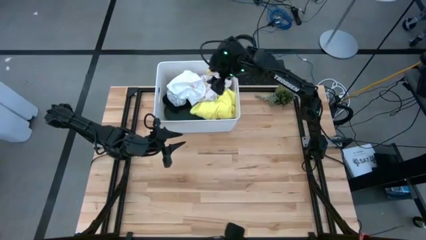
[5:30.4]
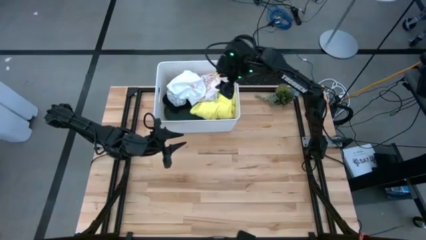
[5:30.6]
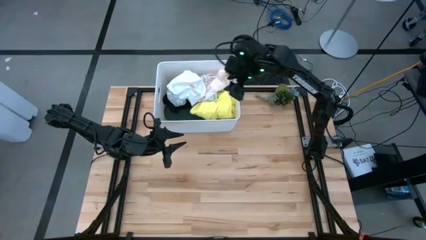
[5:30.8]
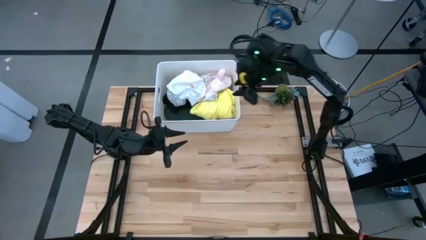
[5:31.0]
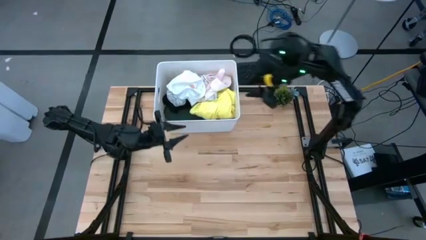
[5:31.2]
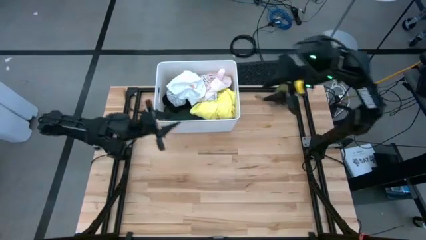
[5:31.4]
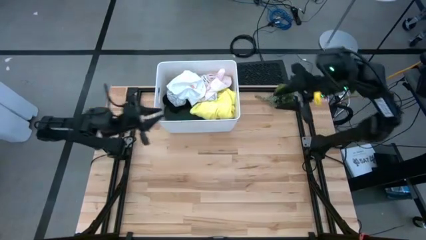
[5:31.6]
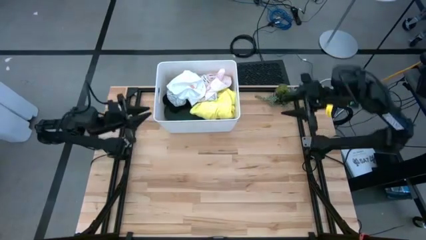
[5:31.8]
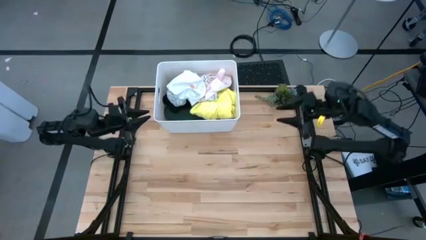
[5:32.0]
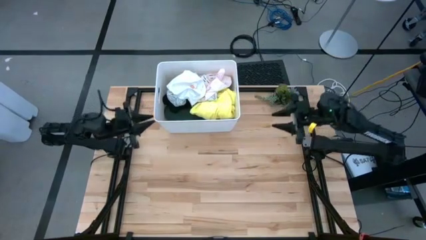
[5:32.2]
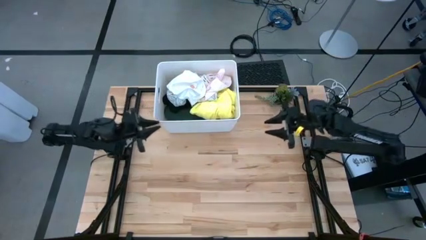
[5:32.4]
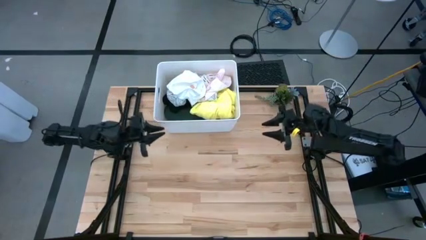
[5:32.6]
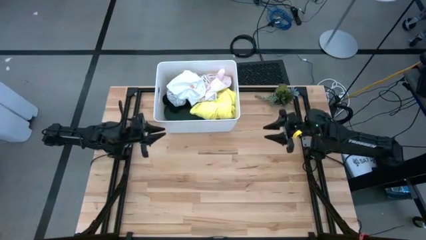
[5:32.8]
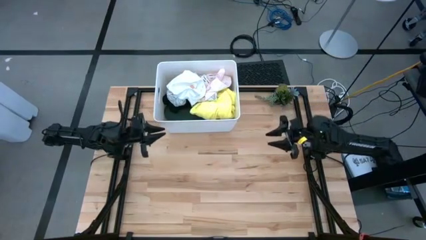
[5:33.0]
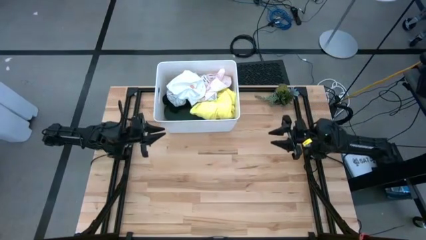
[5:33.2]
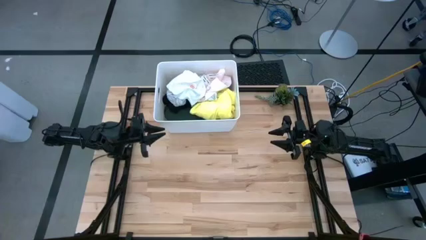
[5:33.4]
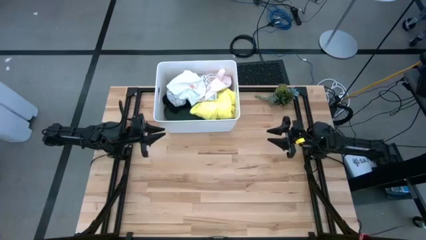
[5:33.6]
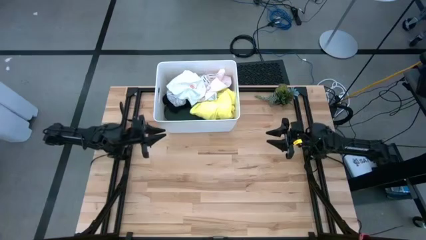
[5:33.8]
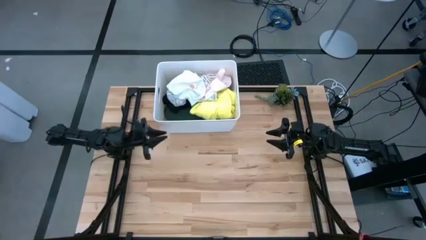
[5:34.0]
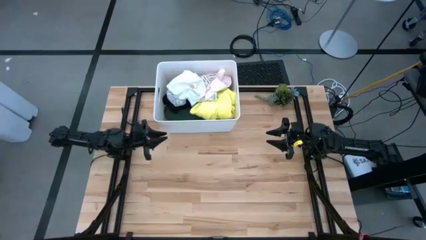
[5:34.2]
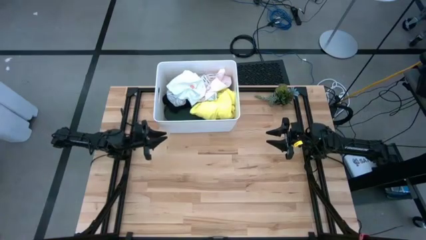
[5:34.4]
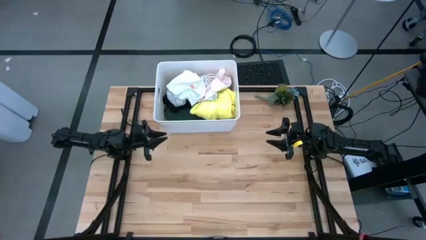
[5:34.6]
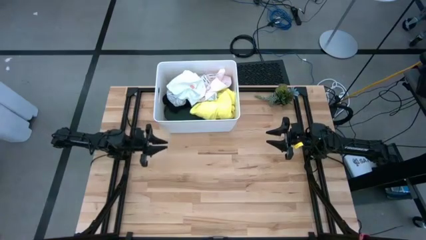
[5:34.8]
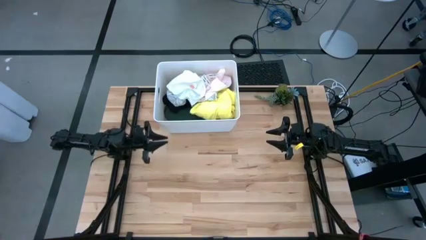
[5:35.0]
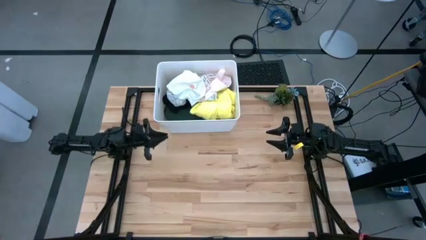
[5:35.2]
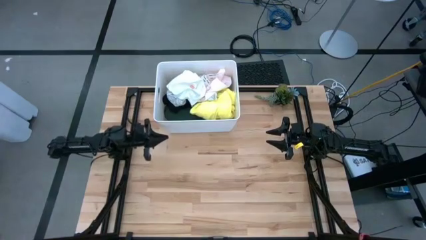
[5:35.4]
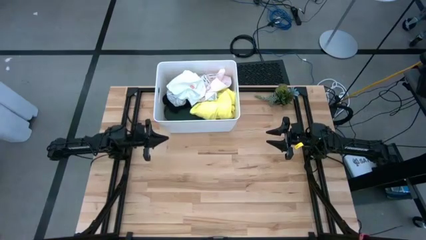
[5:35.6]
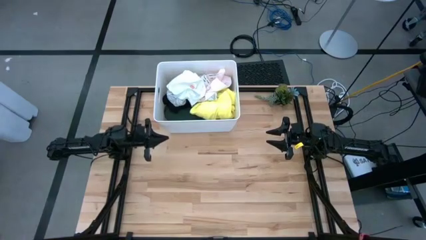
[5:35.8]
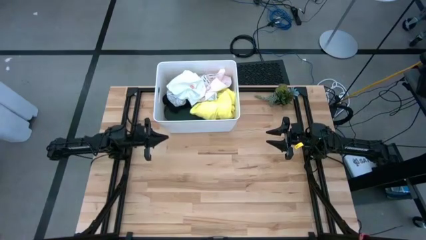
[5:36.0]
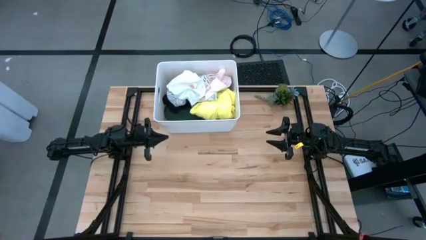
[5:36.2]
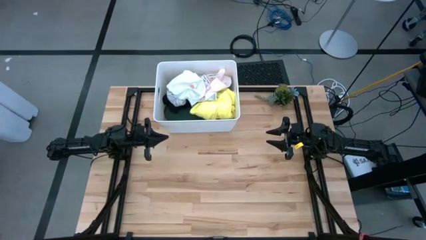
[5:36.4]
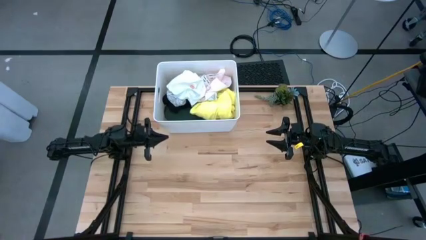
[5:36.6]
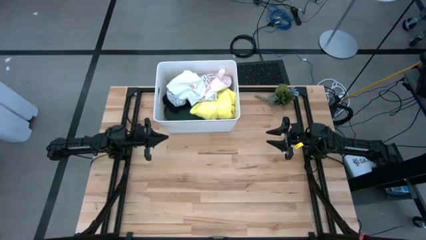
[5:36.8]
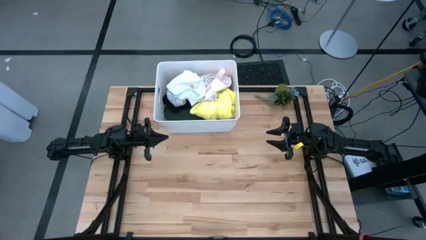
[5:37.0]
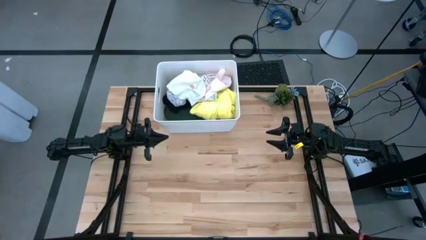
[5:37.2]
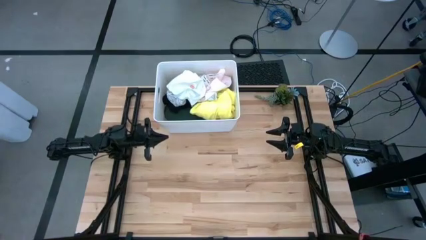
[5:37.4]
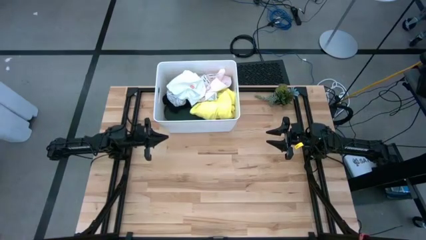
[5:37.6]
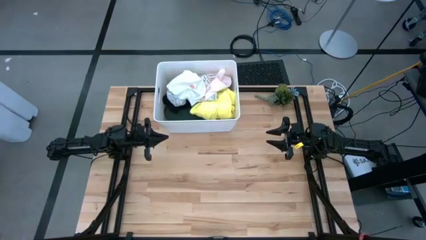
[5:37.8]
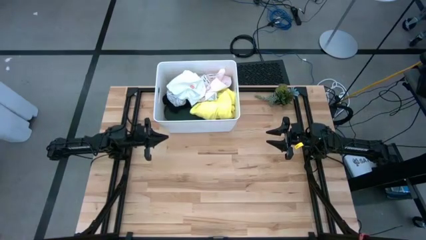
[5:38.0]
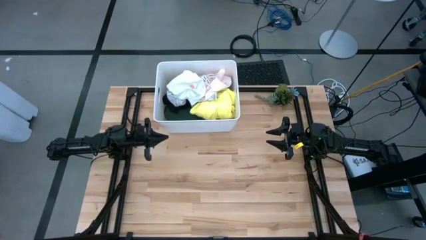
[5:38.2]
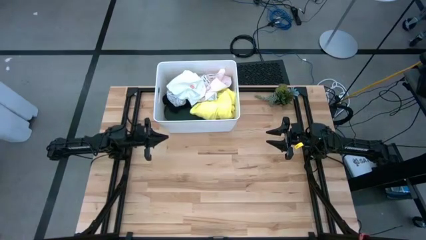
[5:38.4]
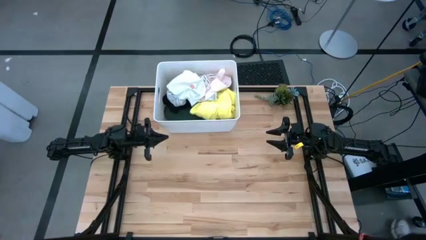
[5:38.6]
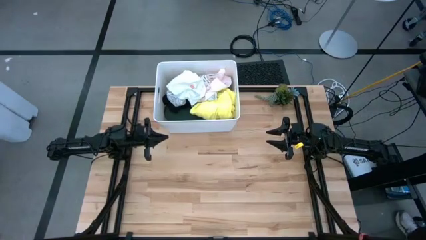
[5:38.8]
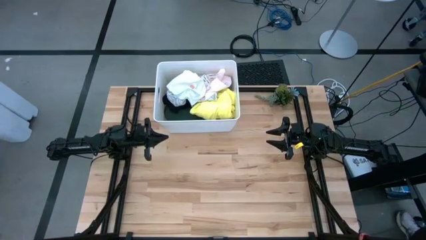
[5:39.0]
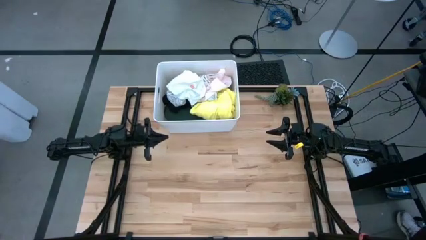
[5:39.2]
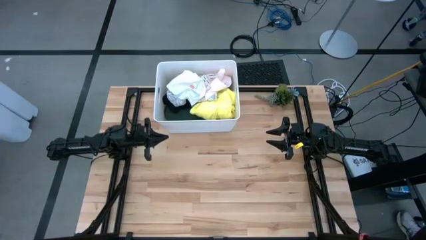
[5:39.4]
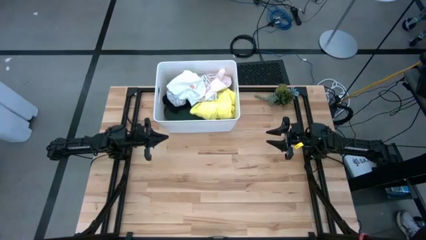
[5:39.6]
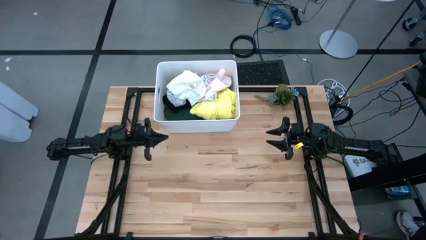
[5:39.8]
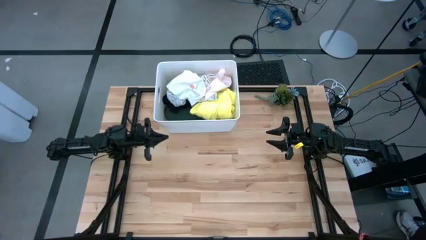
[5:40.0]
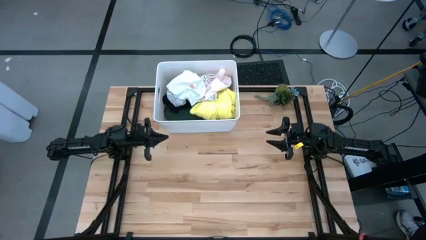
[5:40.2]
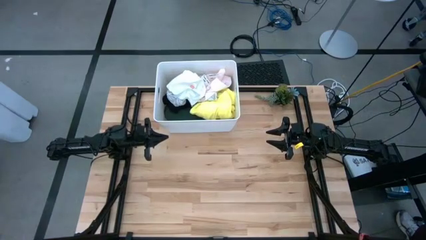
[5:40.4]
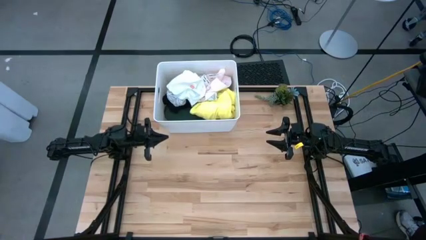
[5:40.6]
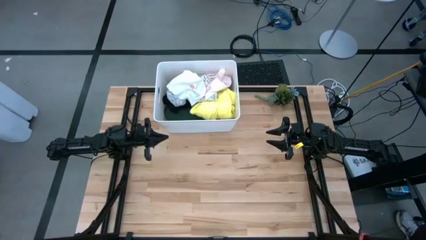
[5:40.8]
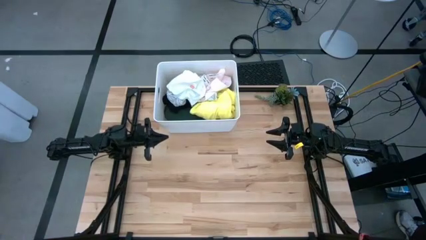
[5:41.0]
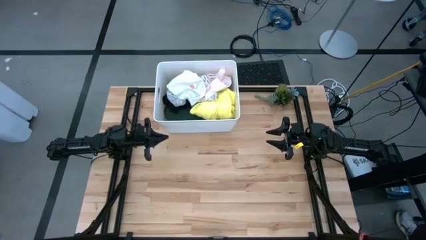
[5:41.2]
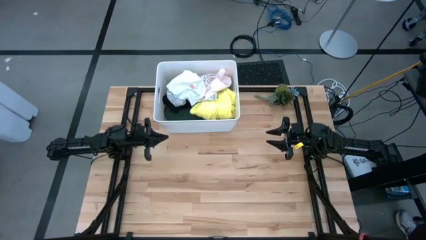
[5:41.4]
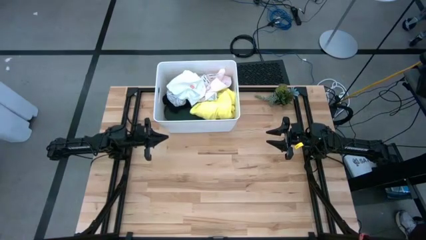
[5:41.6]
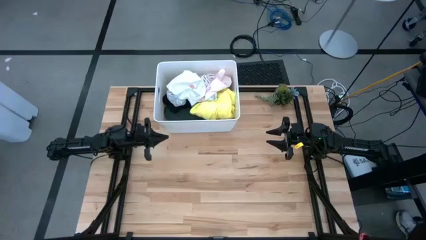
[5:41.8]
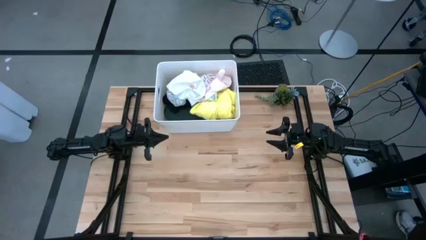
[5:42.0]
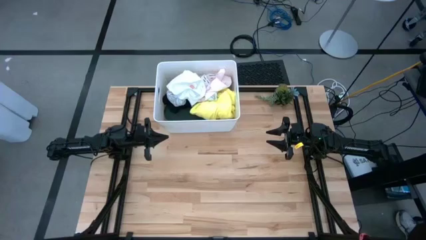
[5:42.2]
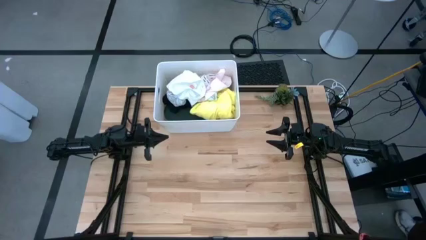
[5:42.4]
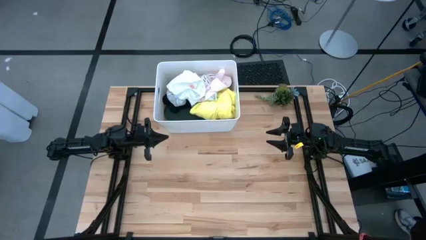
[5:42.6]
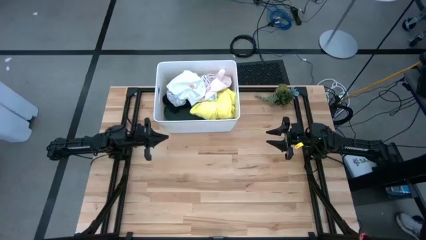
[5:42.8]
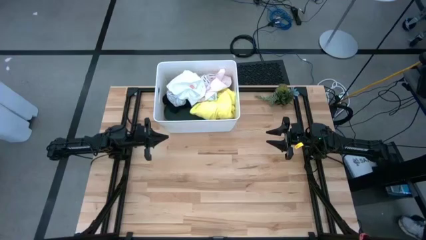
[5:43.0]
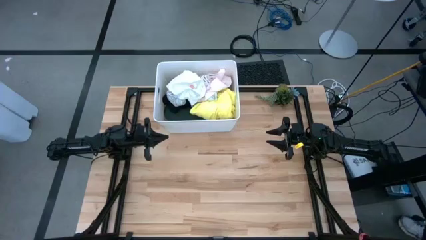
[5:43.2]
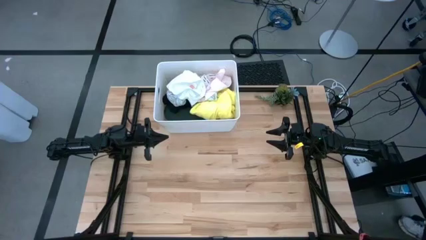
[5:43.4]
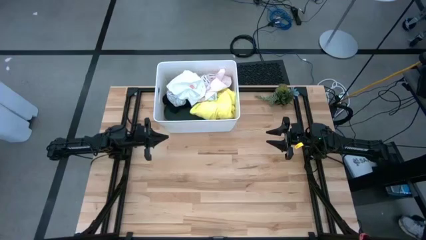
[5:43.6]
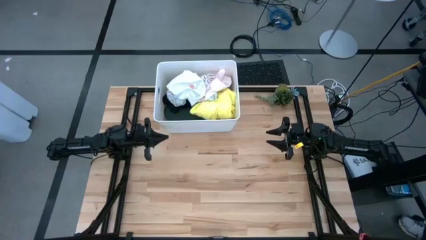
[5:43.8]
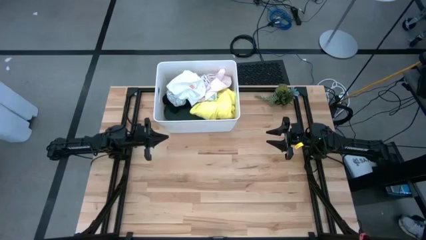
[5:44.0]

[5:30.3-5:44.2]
Task: Fold laundry
Return to Home Position

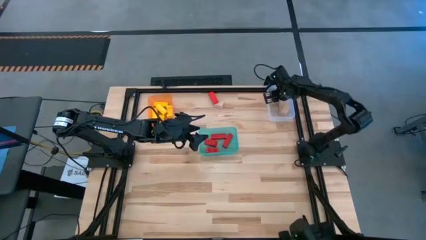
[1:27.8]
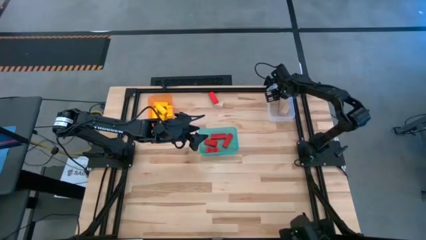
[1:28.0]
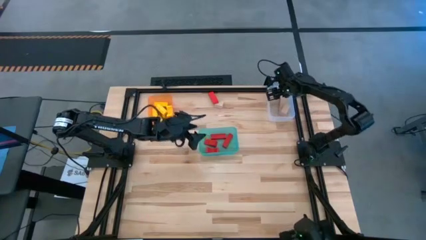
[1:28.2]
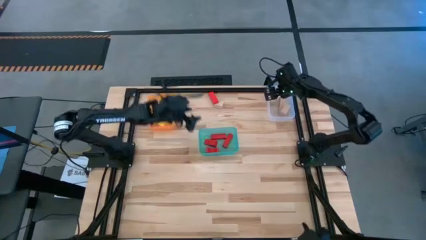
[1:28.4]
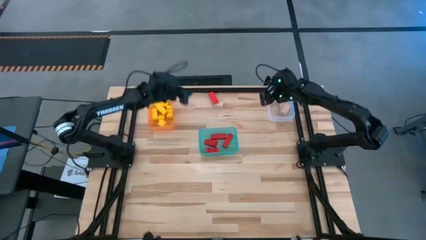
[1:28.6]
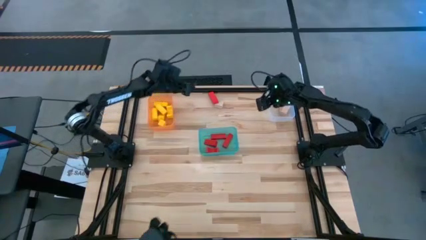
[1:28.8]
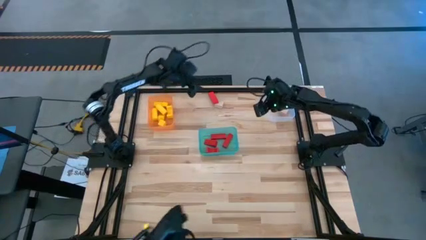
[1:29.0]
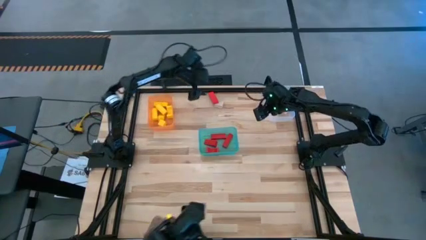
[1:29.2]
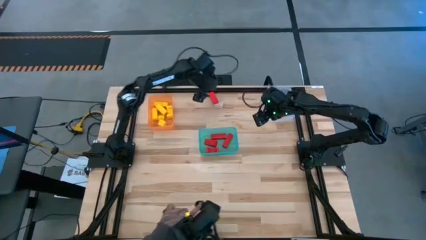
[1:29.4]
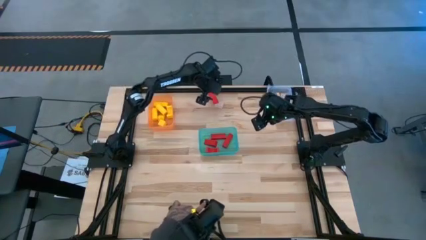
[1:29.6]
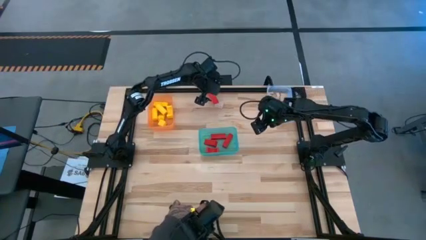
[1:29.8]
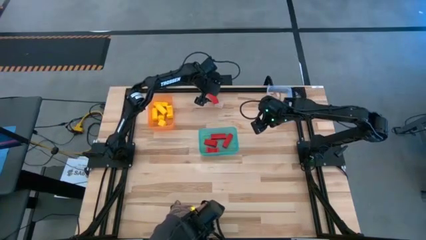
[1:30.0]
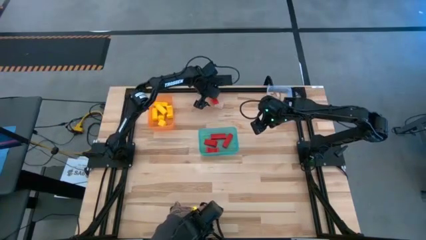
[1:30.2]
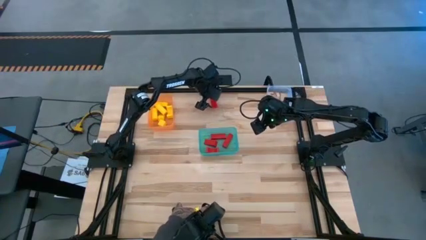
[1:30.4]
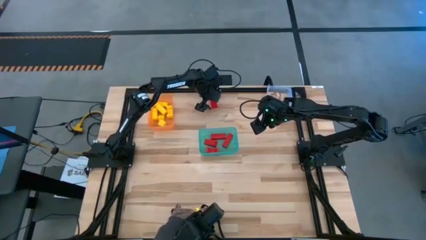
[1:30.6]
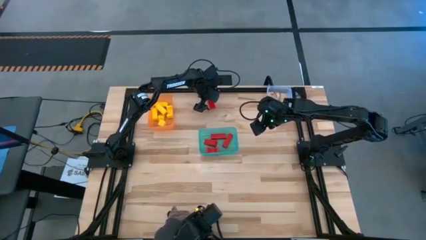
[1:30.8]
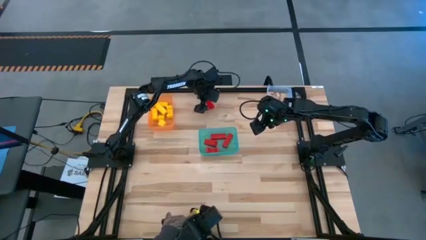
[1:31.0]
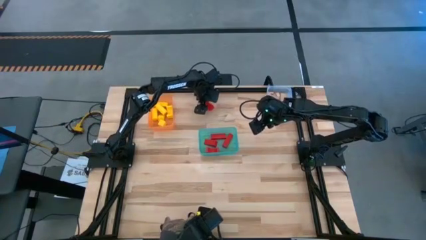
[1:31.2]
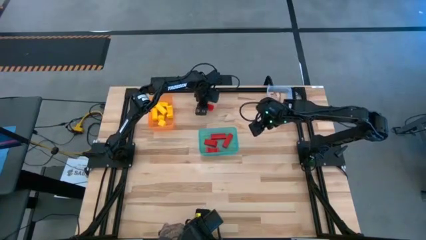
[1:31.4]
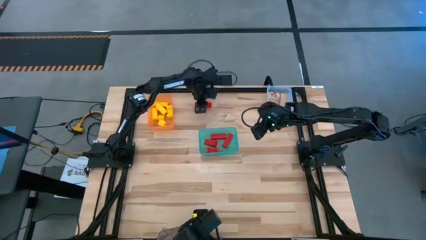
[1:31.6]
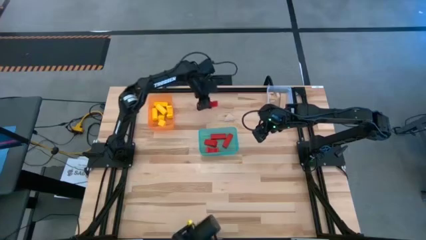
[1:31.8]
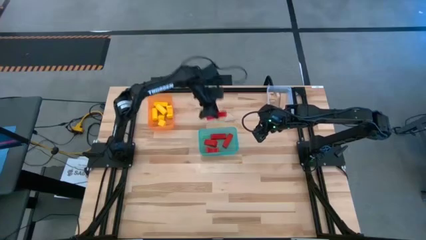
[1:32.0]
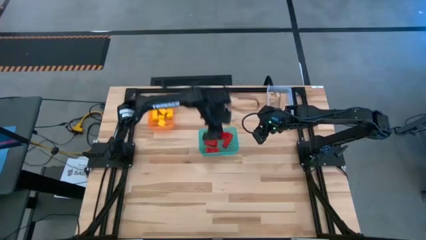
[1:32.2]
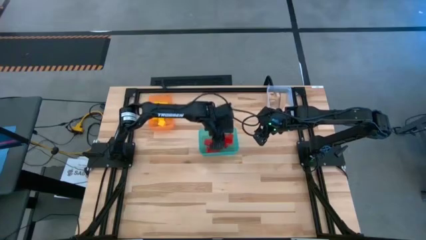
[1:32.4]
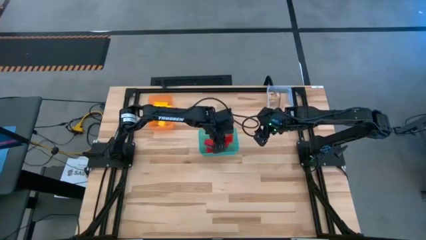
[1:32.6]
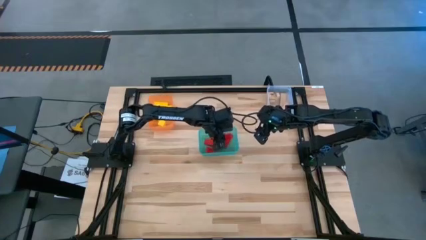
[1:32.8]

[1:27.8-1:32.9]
Task: Sort & place blocks by color
Put the red block into the transparent bin
